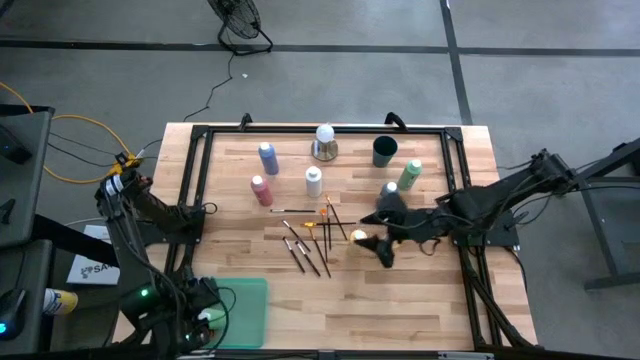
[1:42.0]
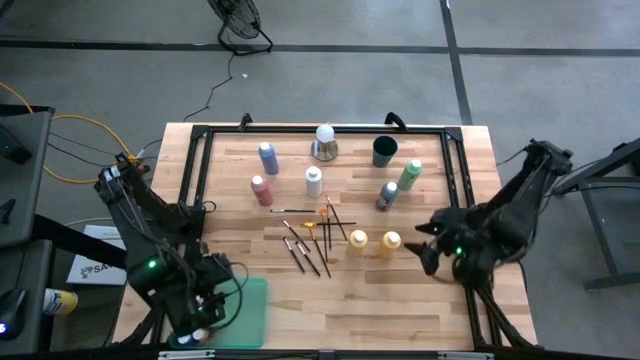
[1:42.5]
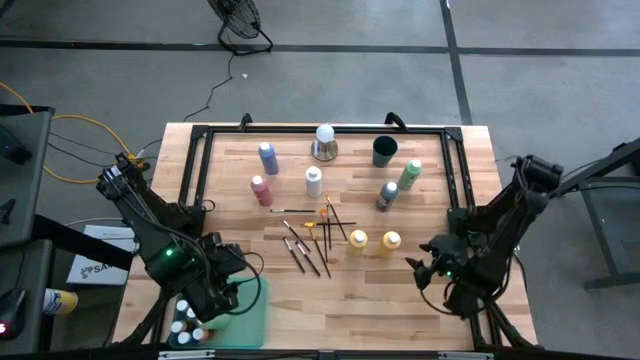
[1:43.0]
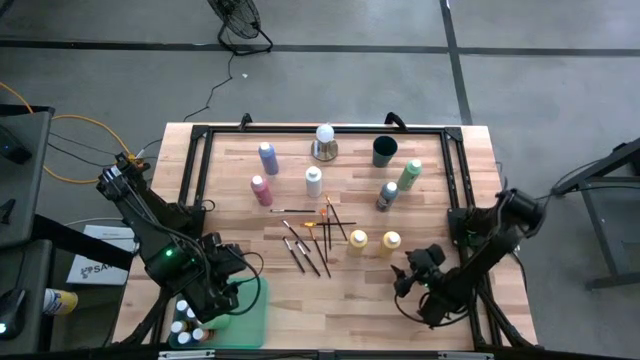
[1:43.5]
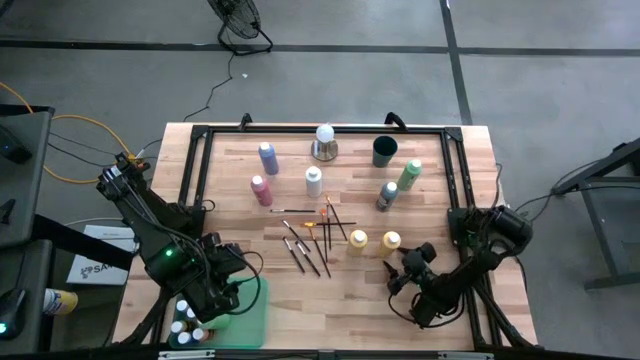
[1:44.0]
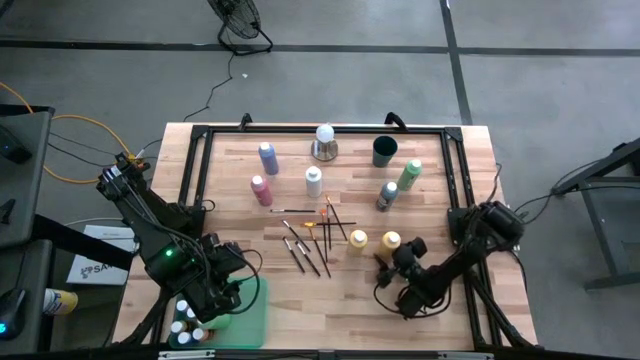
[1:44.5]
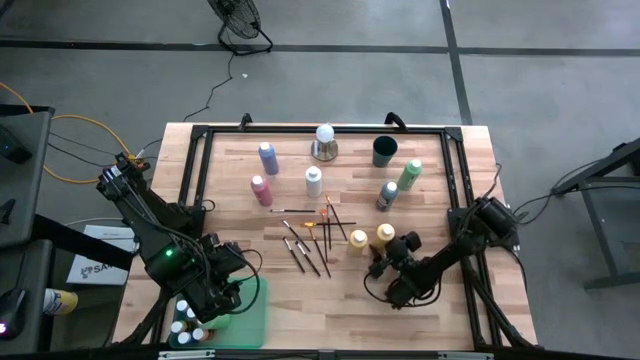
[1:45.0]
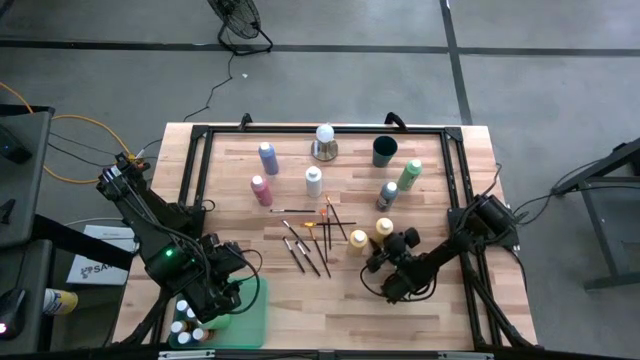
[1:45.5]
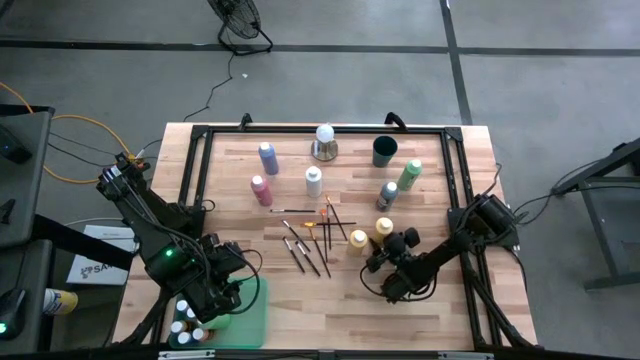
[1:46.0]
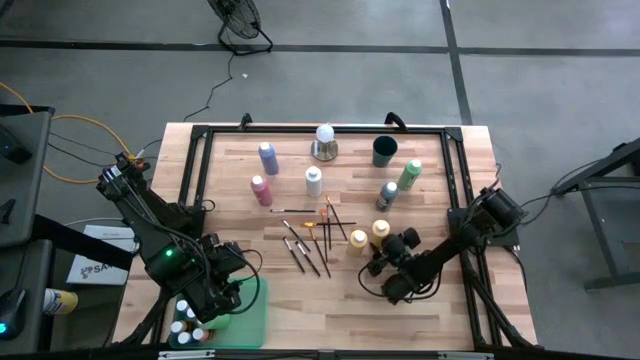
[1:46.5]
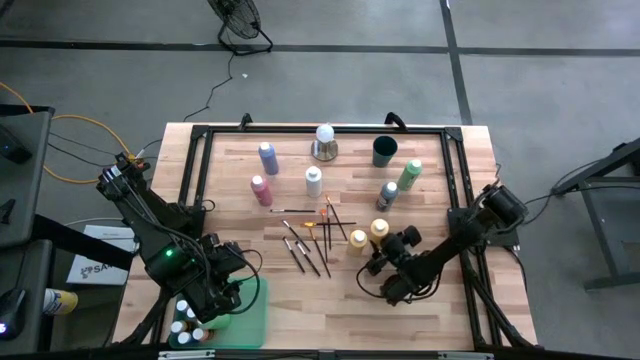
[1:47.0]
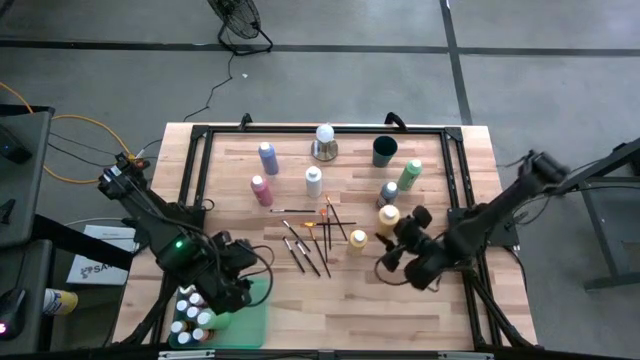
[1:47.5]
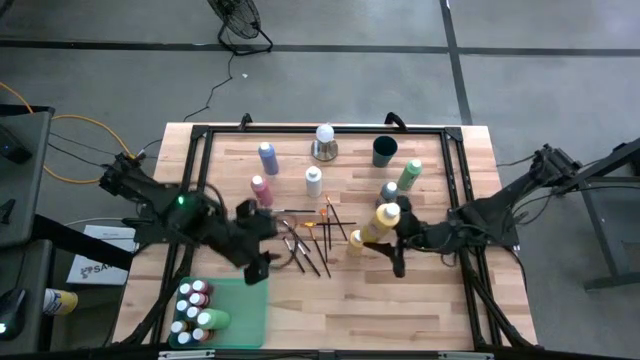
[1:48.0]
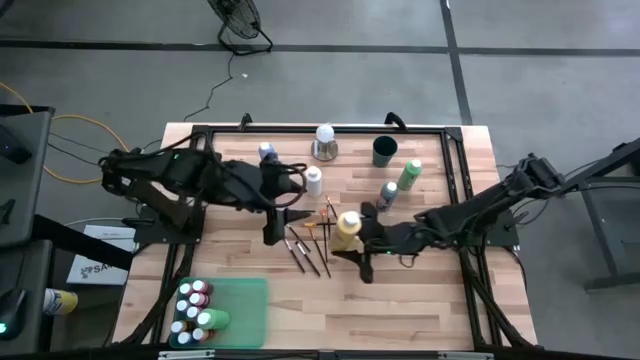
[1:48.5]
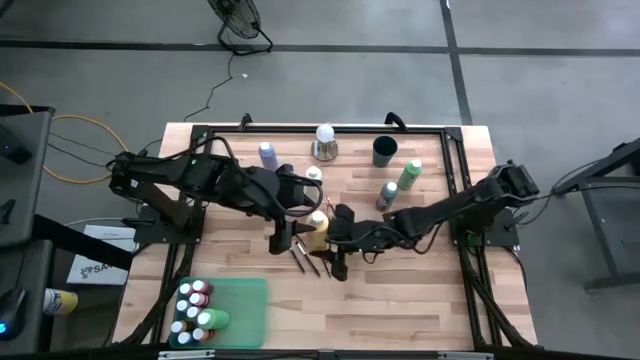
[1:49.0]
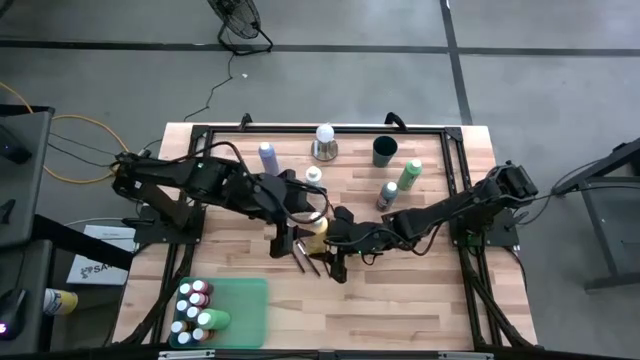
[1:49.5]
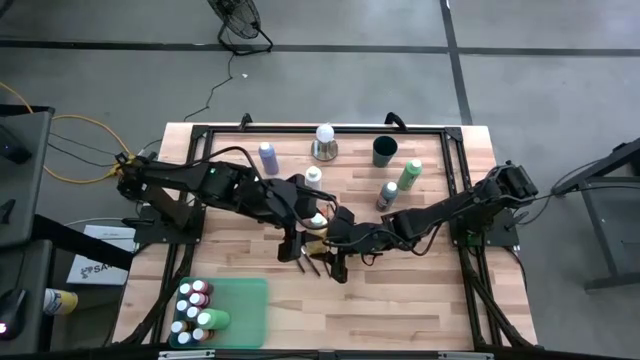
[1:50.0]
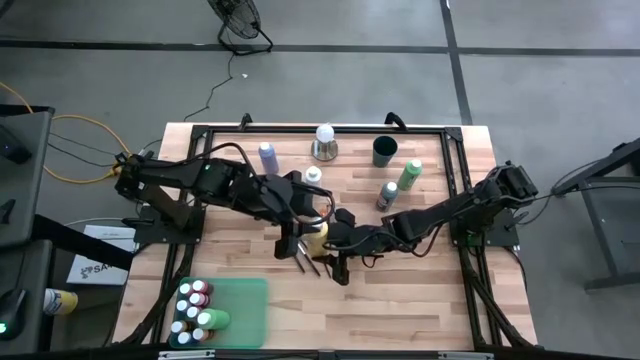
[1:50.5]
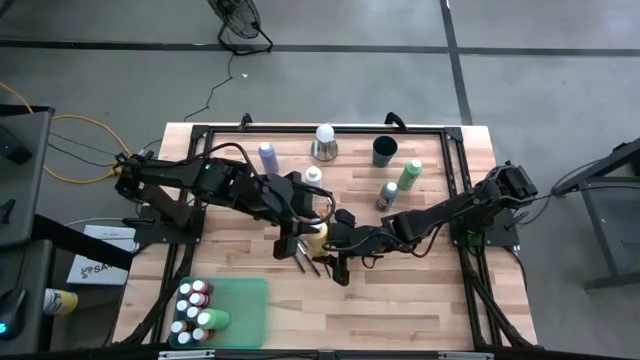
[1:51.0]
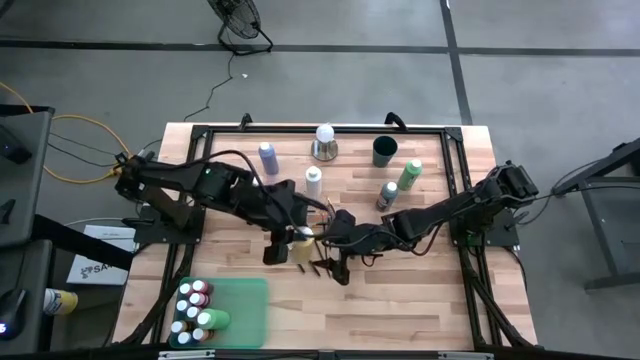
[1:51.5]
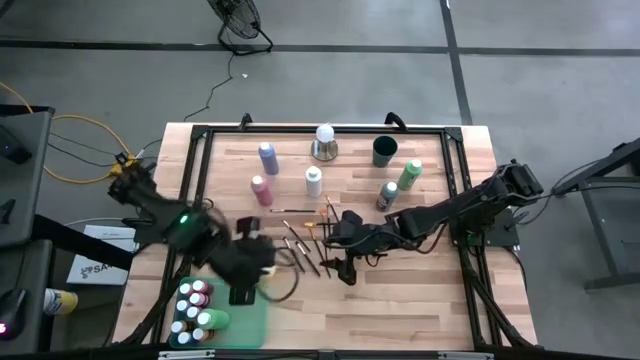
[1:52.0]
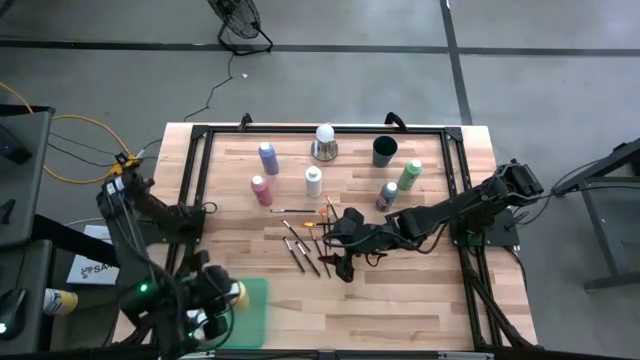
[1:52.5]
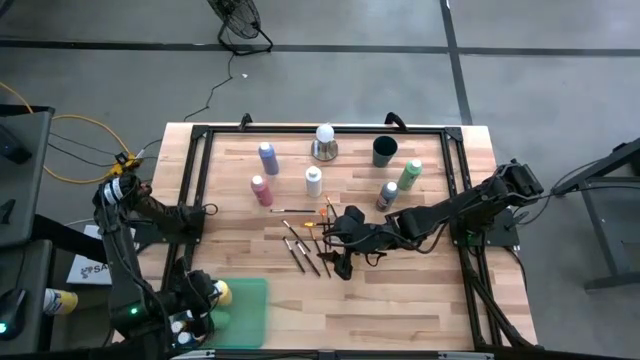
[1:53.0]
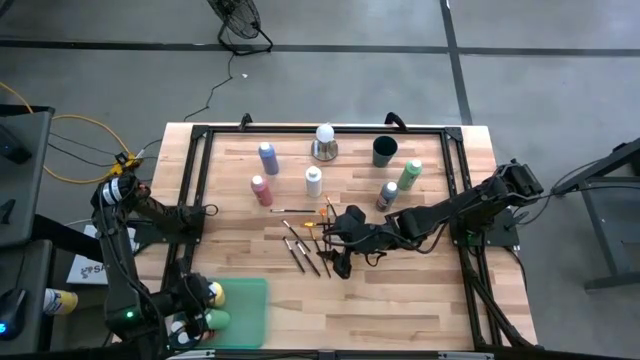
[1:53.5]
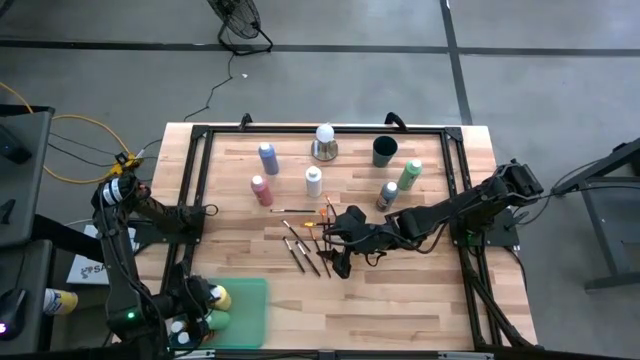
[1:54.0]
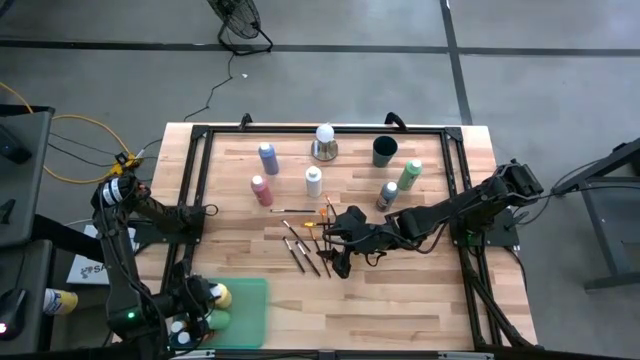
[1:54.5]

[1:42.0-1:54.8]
Task: Pick & Place Paint Supplies
Put the yellow paint bottle into the green bin

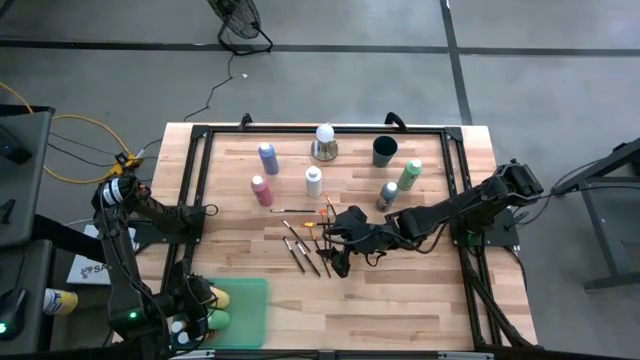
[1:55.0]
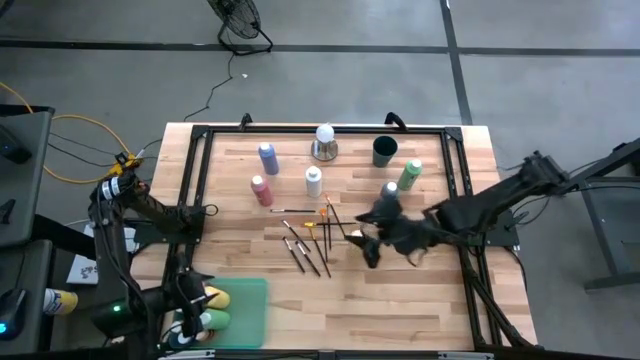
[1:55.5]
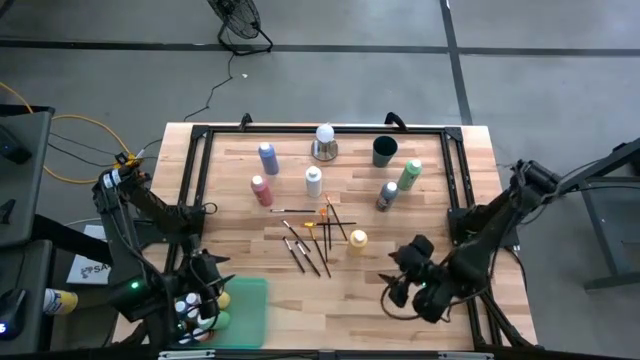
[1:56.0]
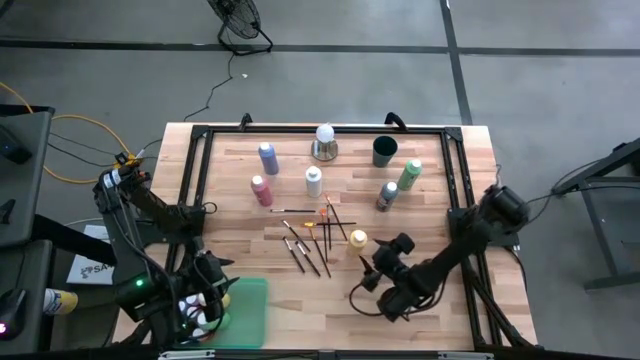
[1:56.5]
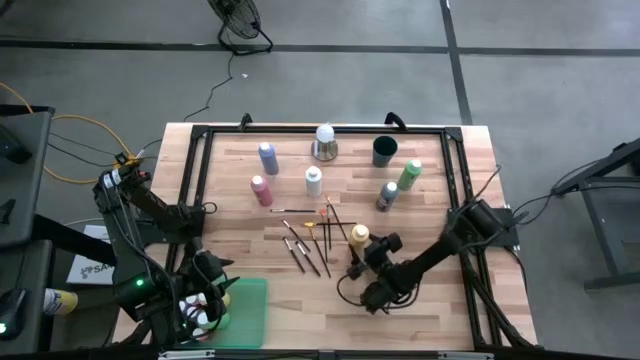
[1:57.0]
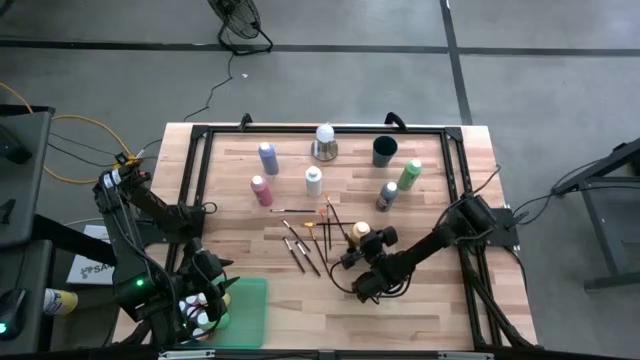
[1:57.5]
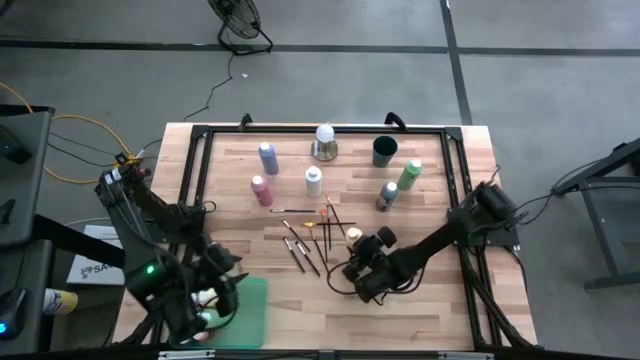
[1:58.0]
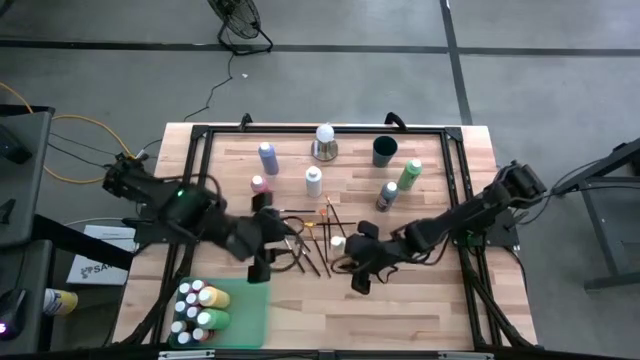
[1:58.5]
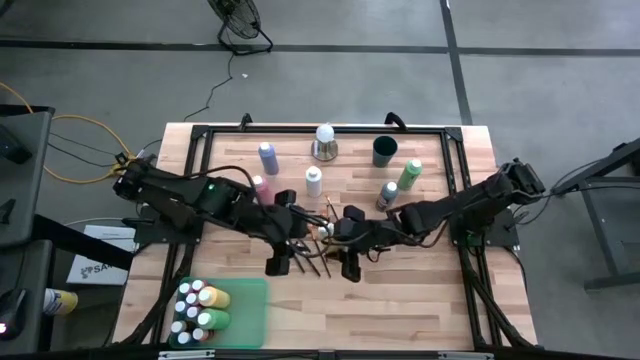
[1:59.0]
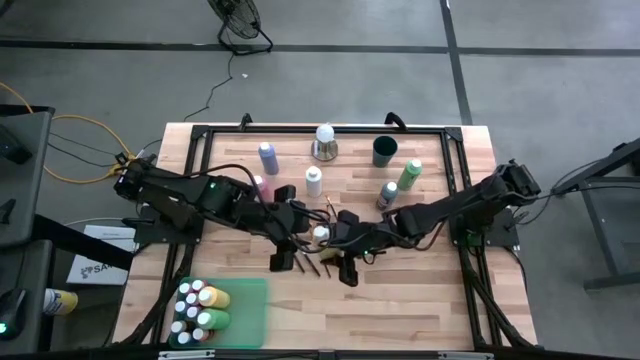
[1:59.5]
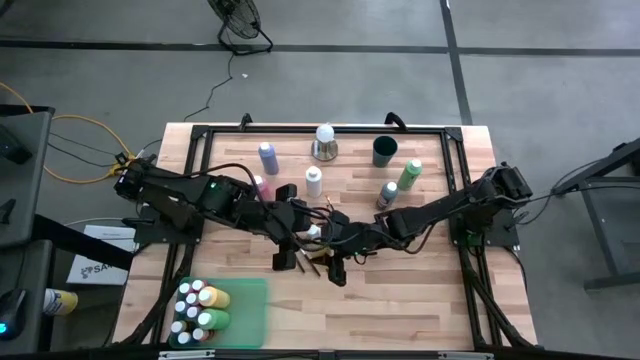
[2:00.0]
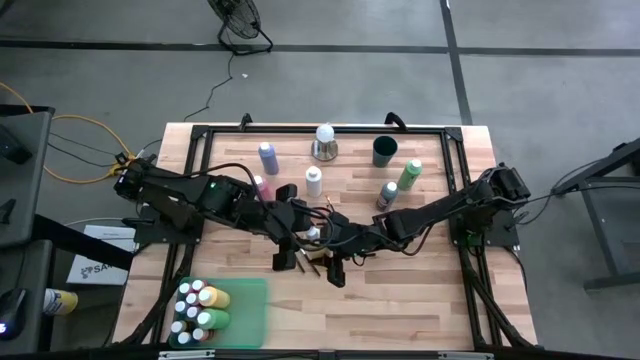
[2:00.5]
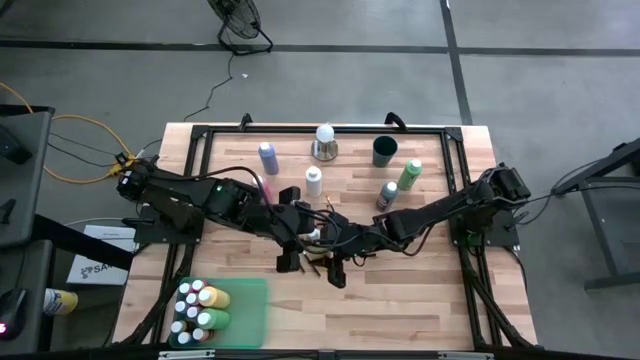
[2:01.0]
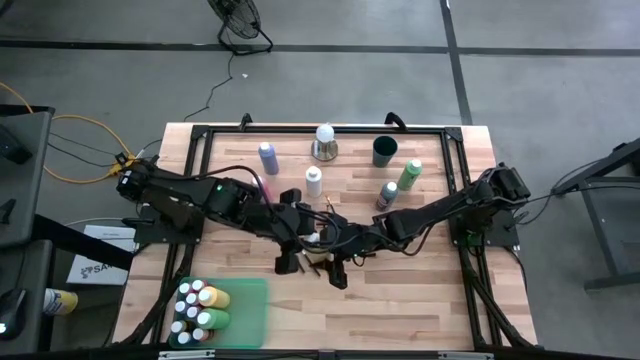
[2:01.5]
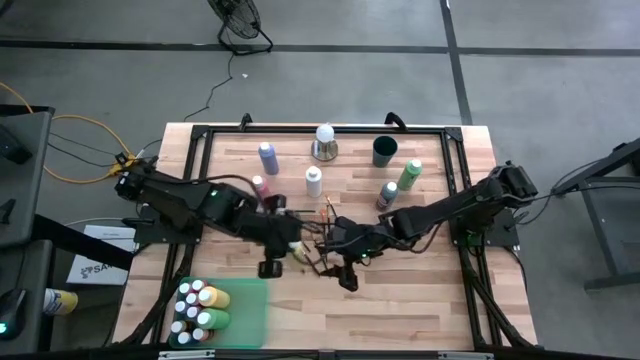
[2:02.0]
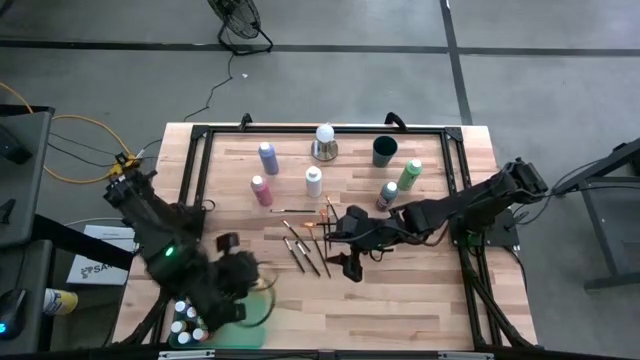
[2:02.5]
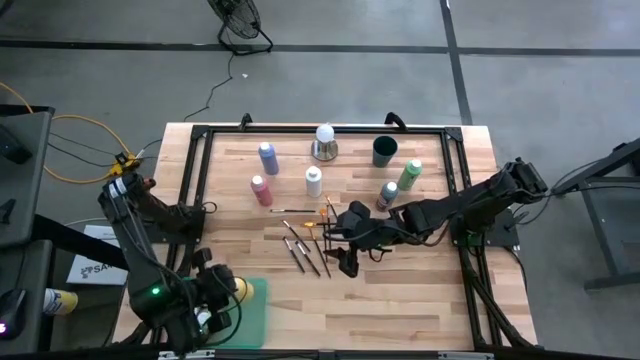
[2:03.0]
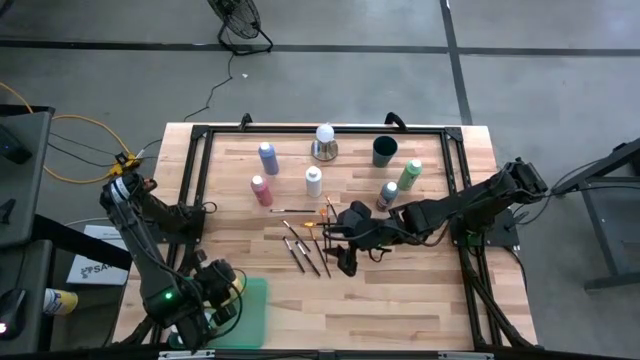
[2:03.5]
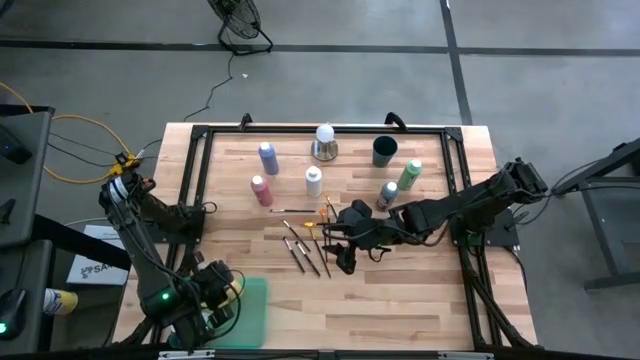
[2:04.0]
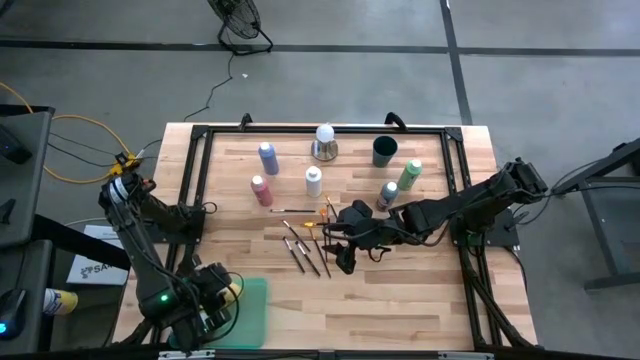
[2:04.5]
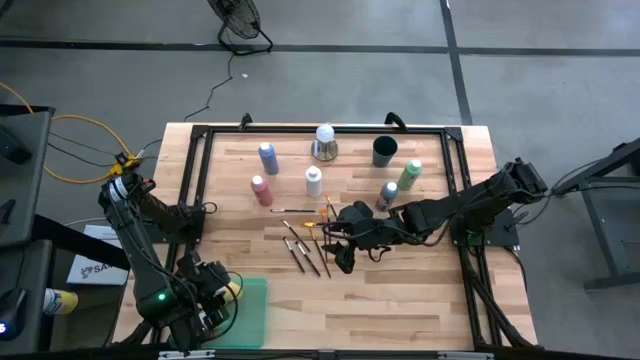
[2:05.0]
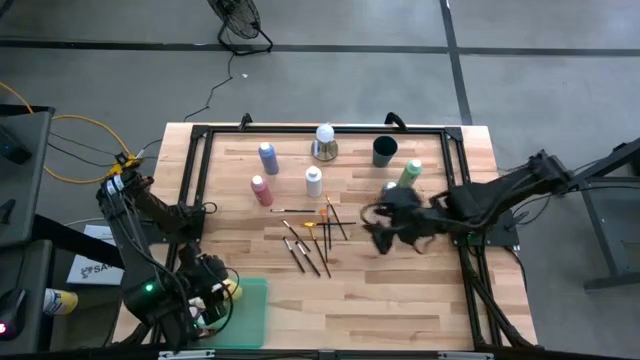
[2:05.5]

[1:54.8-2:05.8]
Put the yellow paint bottle into the green bin
